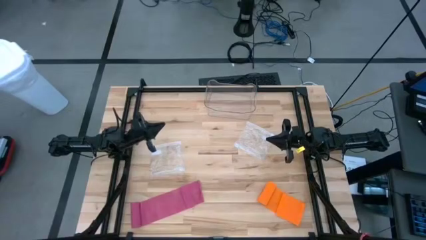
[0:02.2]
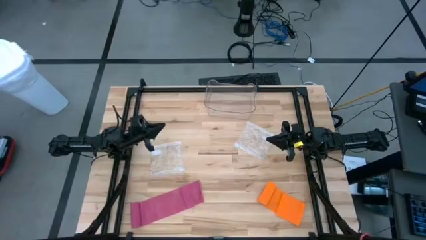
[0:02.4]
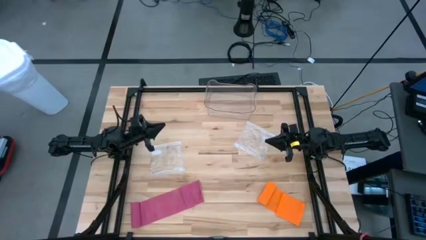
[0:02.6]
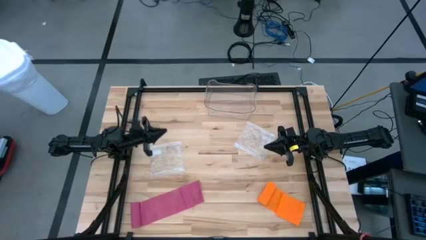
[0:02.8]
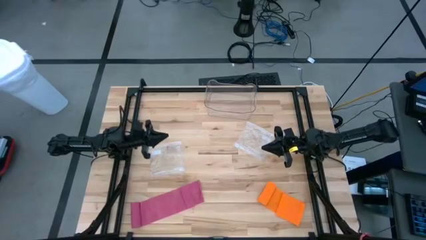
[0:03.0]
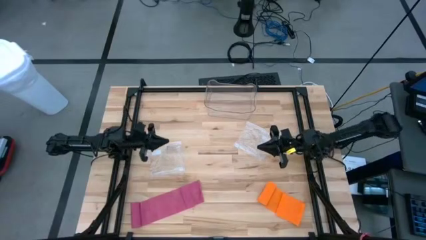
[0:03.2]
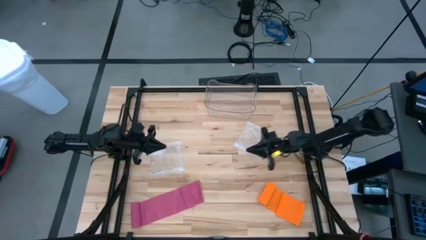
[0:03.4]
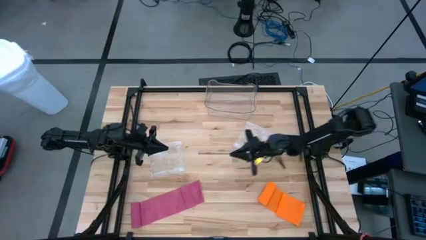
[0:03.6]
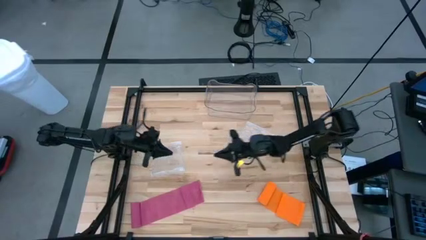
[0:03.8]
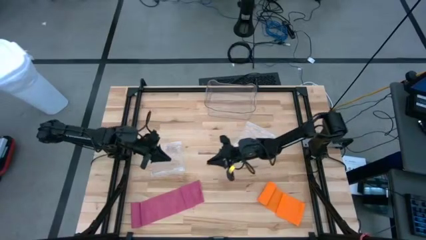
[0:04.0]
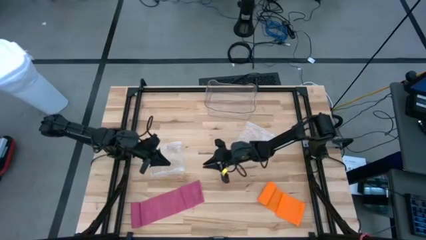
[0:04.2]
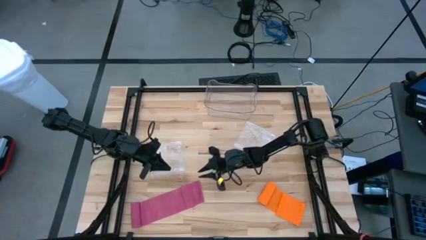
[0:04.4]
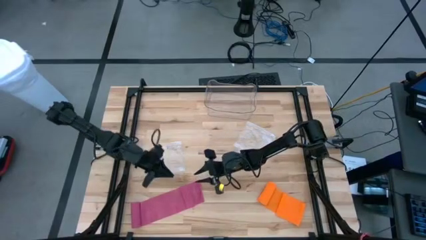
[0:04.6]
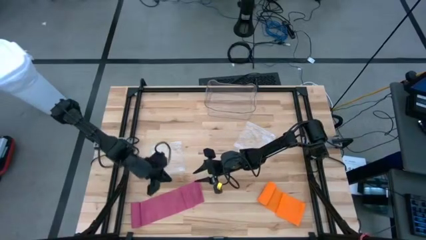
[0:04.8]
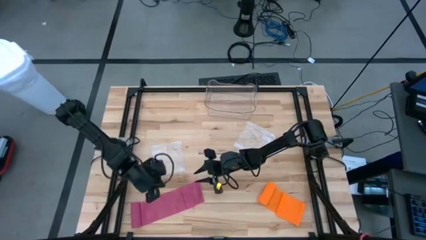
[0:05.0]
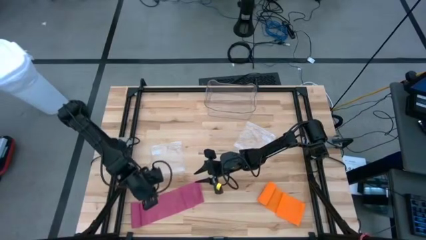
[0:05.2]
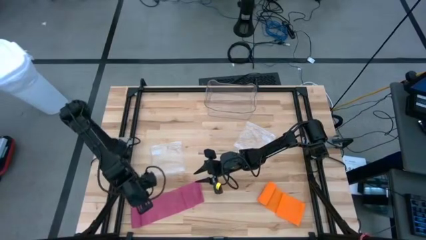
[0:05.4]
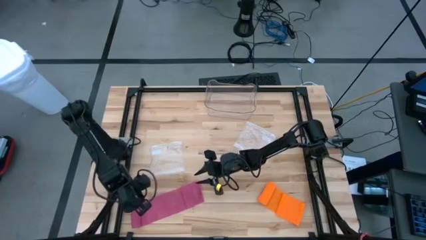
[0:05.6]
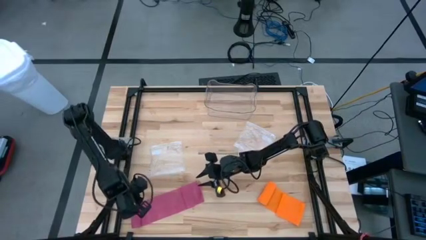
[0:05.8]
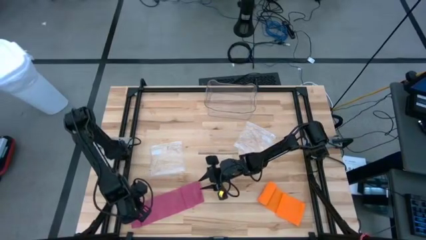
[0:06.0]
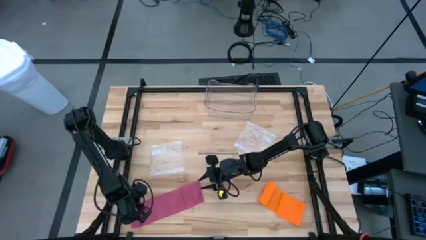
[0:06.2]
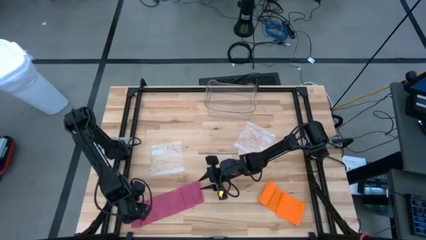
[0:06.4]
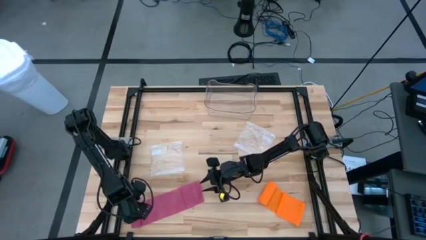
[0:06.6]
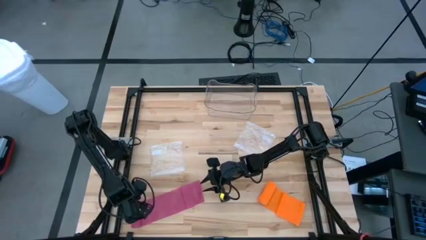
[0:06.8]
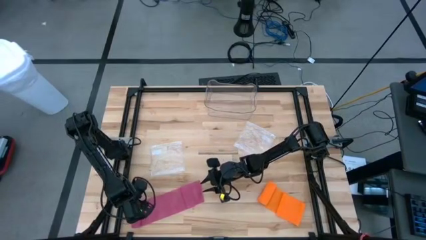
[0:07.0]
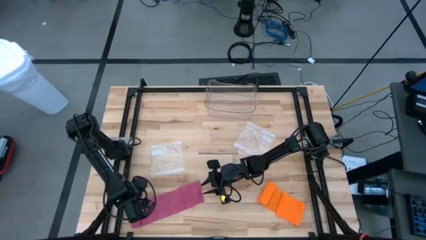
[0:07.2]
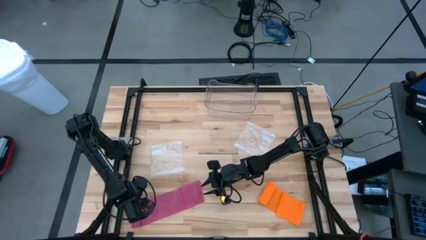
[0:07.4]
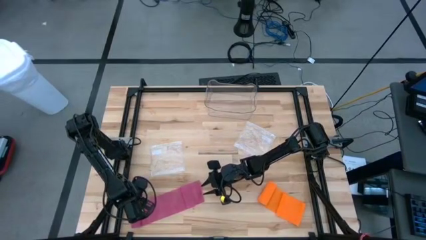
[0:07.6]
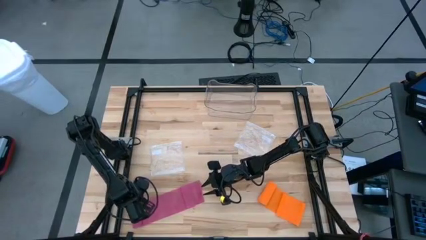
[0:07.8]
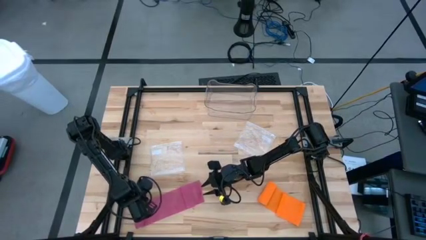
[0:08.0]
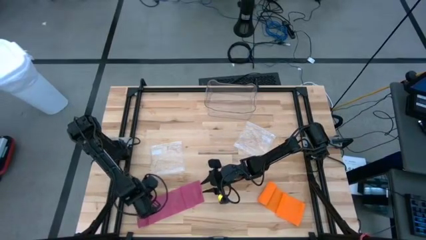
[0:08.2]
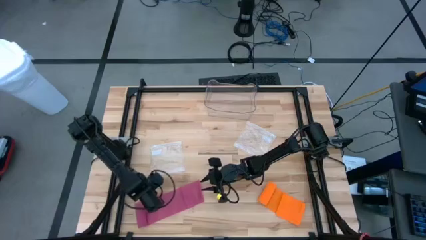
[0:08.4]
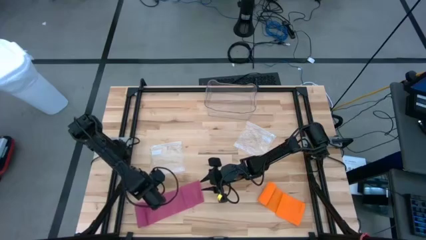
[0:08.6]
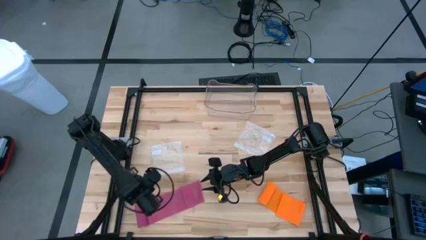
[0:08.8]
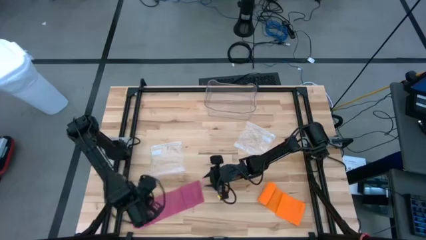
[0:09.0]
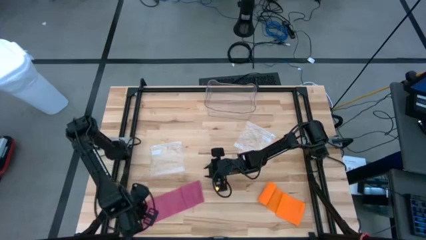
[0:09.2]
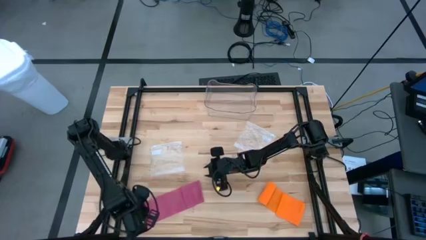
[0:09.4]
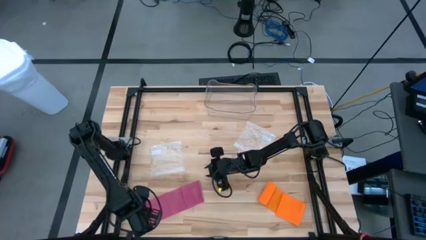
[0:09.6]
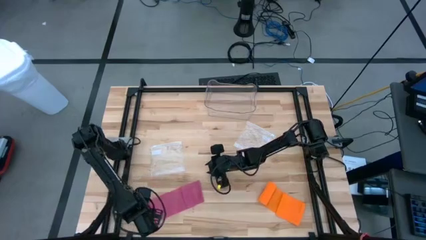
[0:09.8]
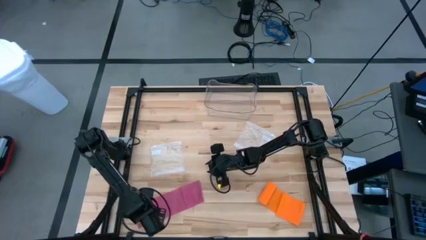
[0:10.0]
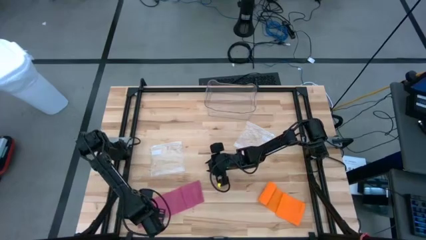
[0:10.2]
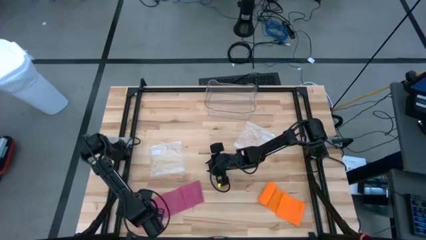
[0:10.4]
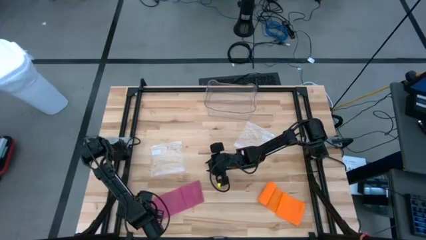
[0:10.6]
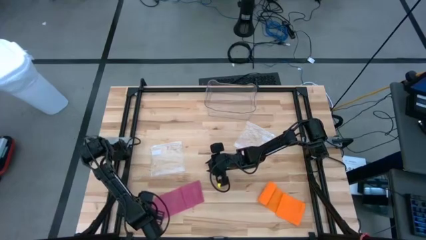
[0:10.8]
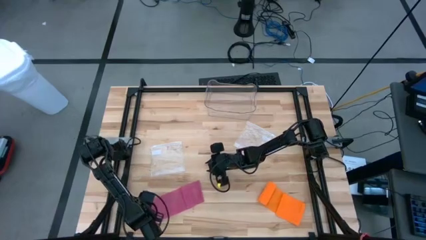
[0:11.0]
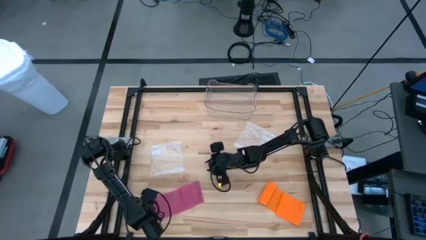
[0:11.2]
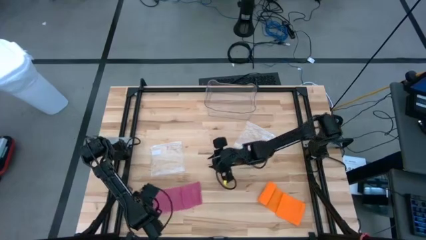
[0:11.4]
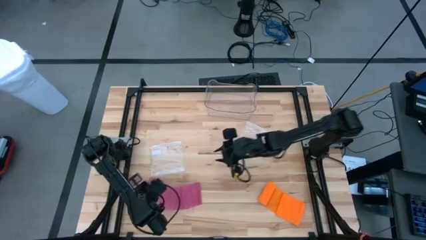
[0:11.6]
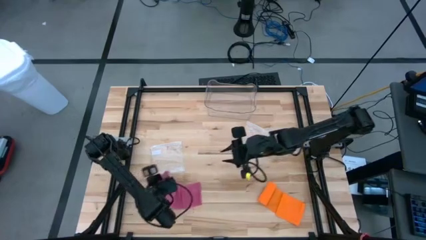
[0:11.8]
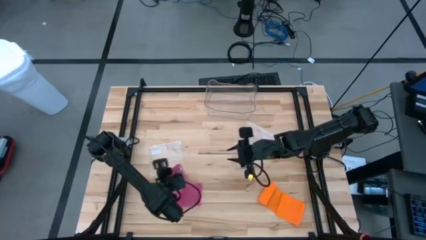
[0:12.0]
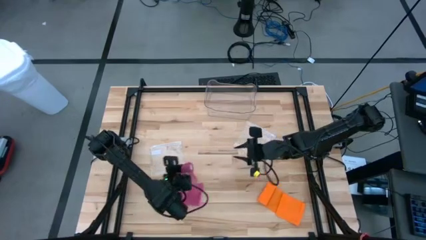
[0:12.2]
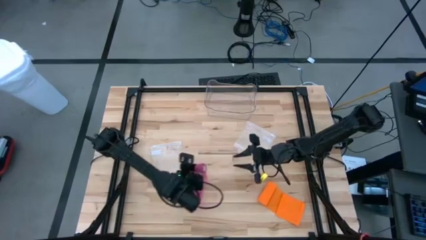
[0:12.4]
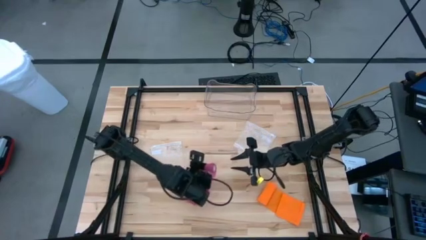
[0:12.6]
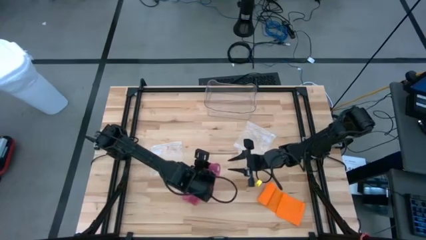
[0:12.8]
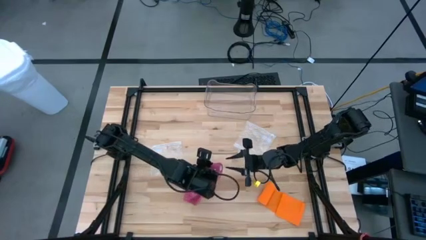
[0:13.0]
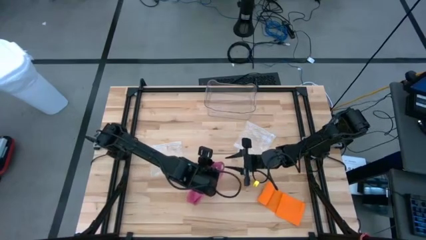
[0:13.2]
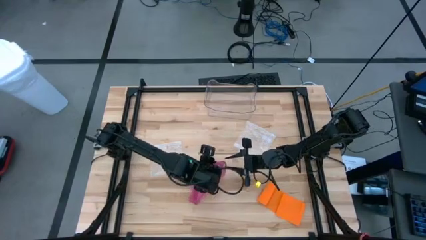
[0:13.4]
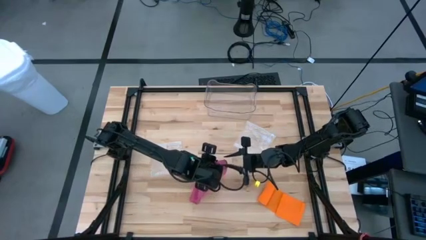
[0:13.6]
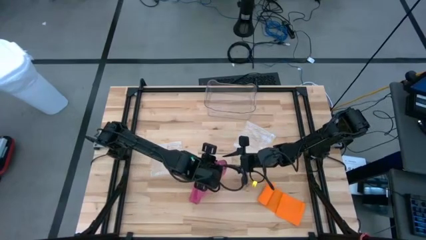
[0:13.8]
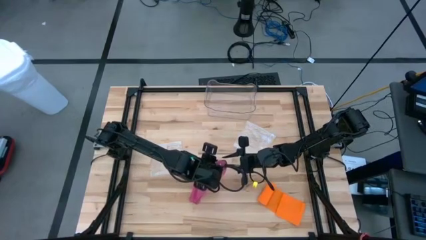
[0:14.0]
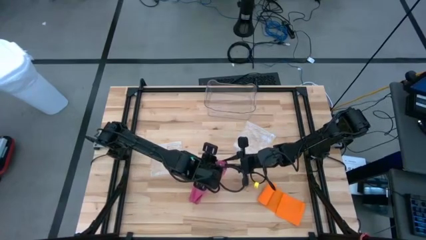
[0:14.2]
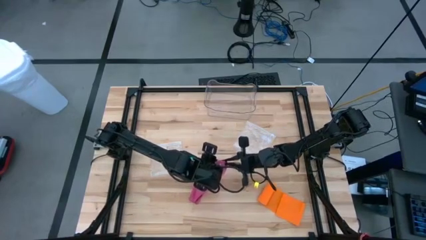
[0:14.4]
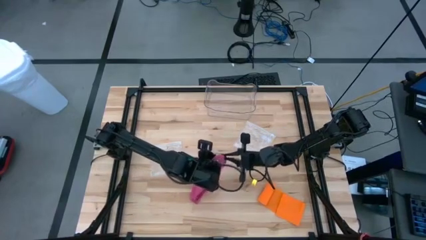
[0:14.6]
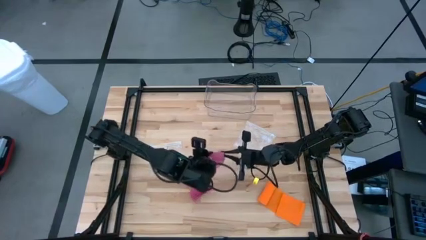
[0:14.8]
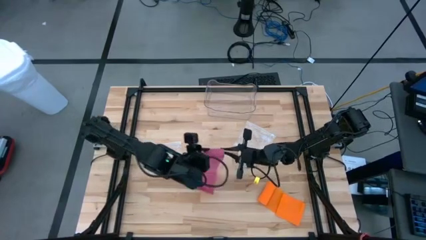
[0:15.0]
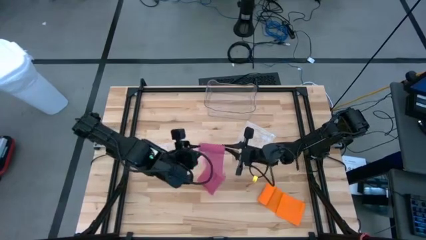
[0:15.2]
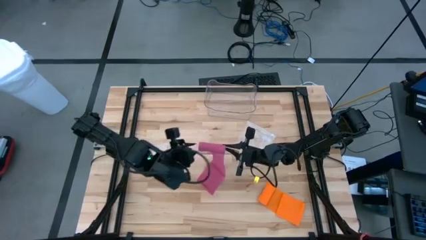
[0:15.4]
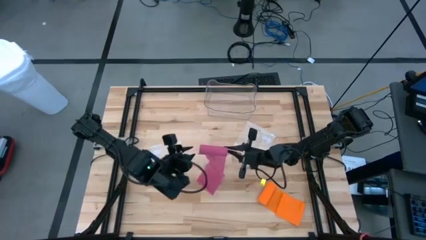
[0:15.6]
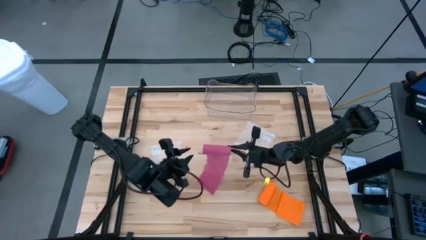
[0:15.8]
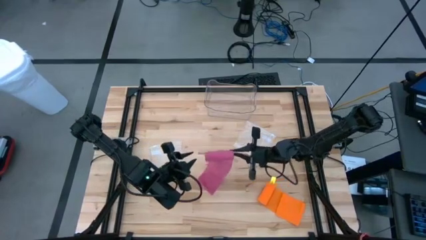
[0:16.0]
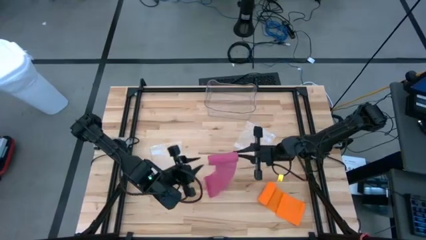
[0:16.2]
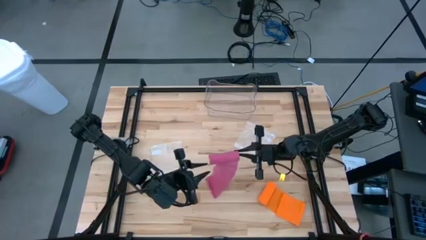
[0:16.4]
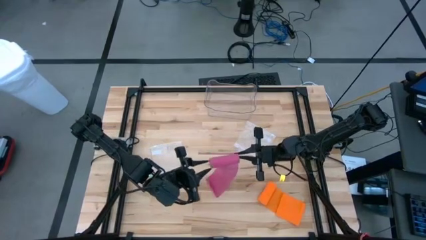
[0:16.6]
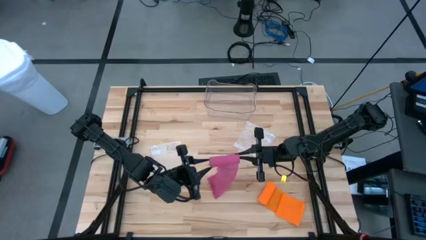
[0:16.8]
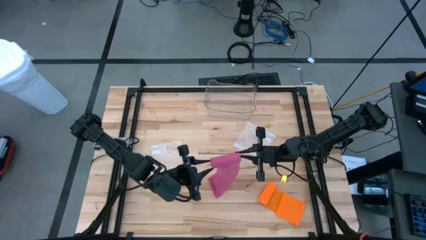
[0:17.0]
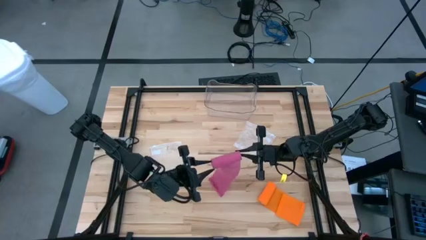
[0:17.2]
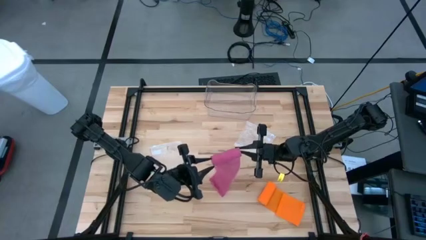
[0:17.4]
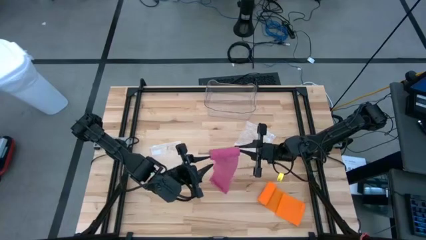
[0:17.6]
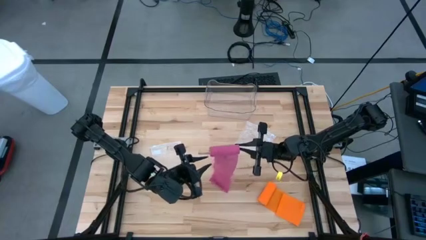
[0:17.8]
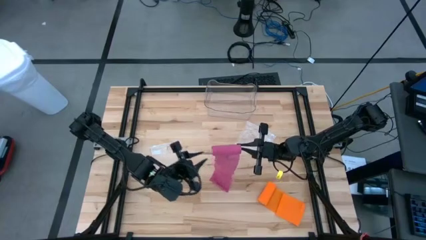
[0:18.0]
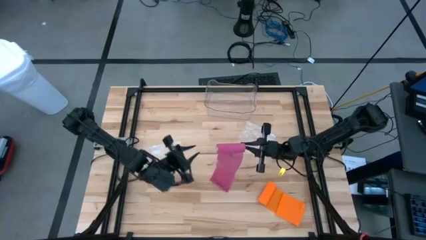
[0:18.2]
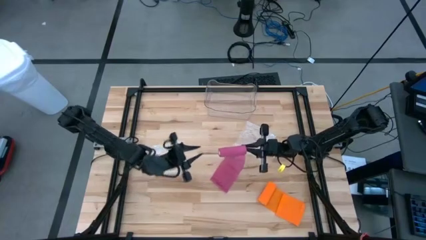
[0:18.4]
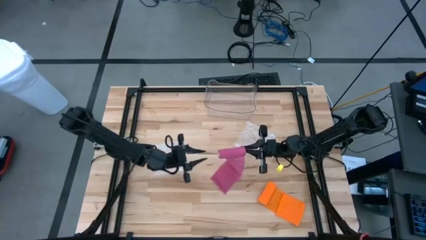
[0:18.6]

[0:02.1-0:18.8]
Task: Roll bandage
Roll the pink bandage
